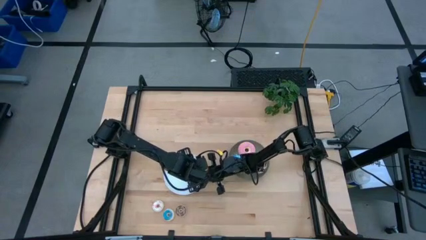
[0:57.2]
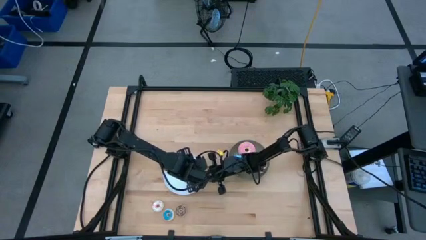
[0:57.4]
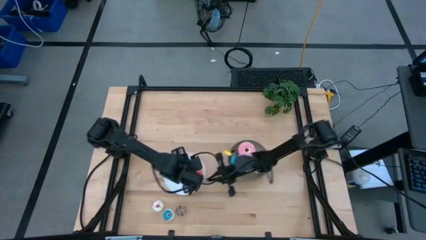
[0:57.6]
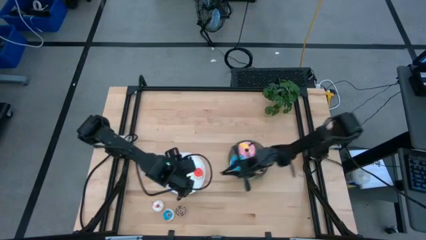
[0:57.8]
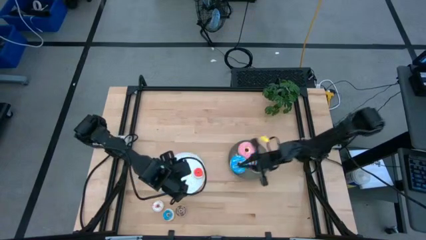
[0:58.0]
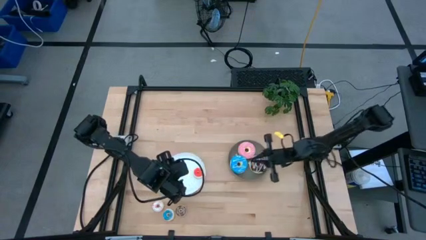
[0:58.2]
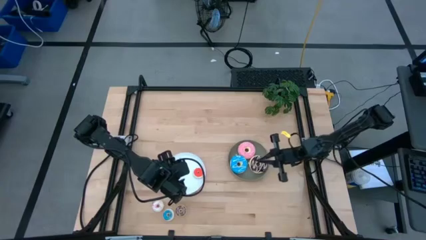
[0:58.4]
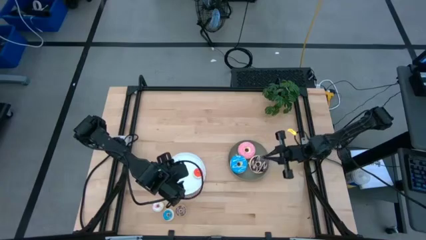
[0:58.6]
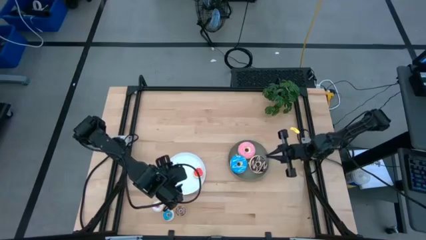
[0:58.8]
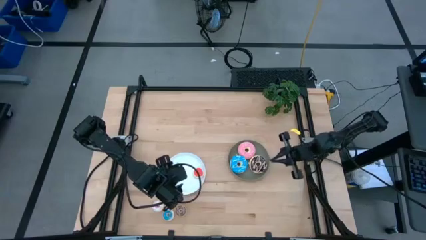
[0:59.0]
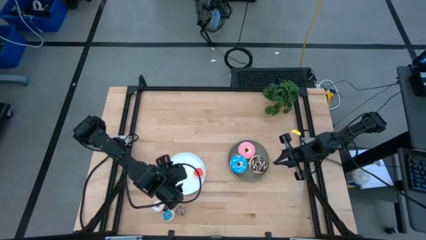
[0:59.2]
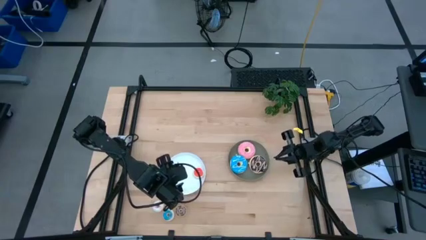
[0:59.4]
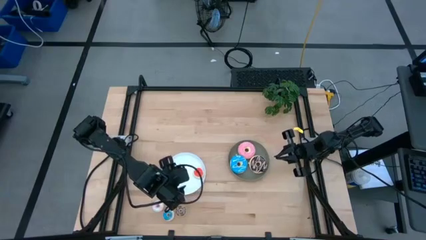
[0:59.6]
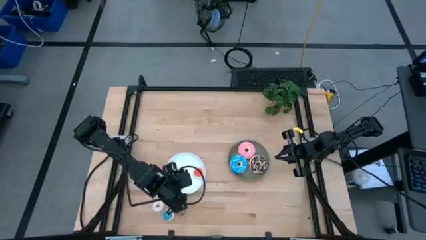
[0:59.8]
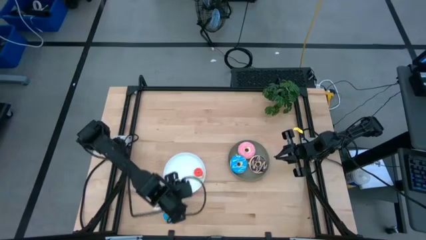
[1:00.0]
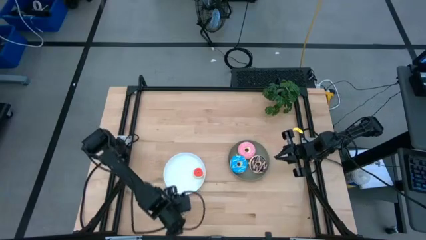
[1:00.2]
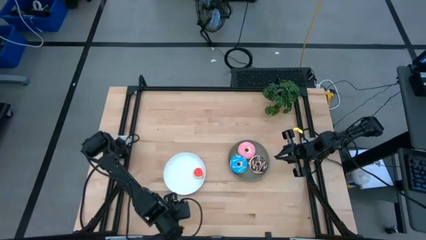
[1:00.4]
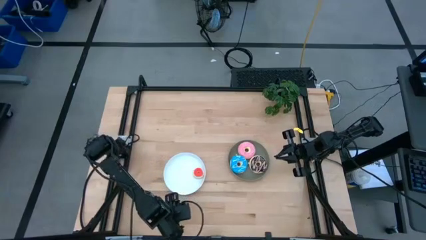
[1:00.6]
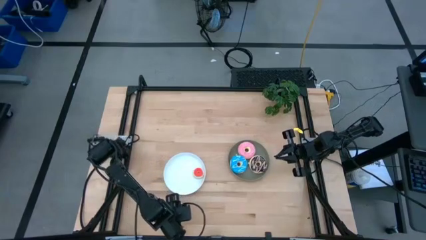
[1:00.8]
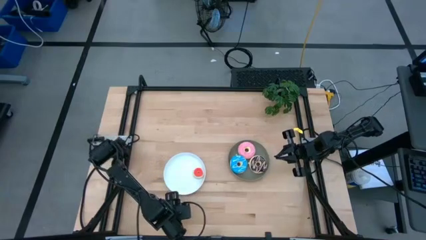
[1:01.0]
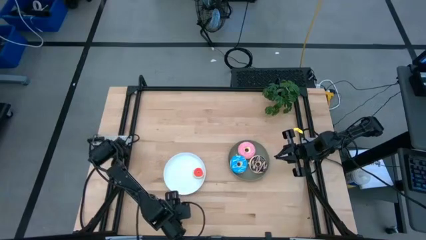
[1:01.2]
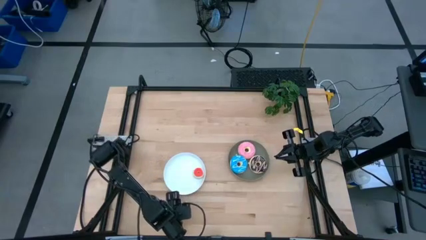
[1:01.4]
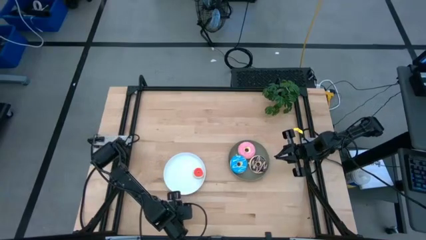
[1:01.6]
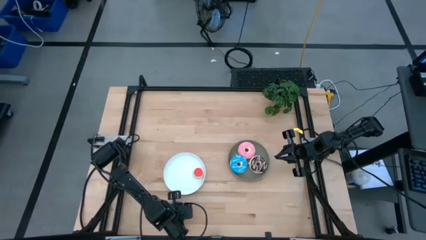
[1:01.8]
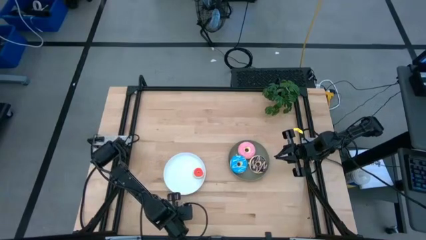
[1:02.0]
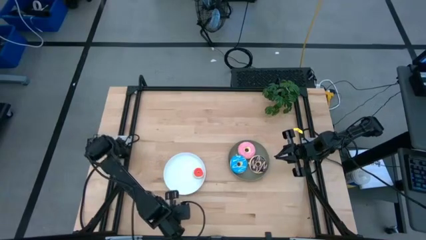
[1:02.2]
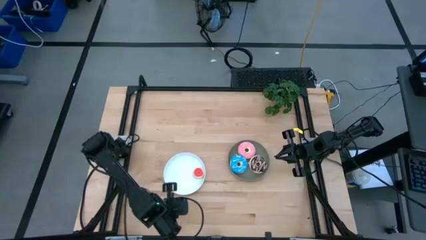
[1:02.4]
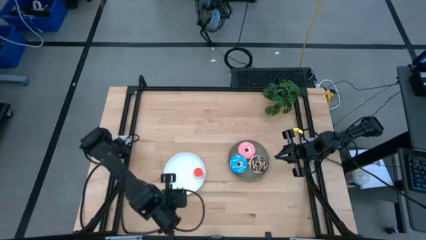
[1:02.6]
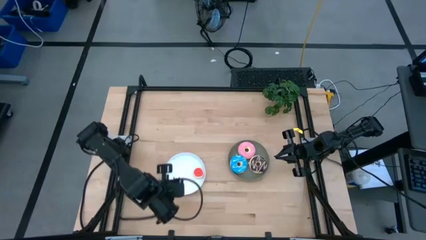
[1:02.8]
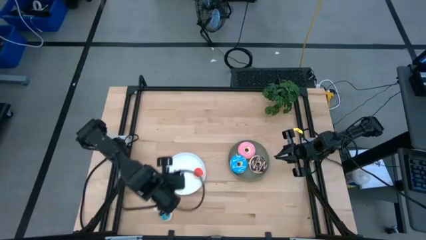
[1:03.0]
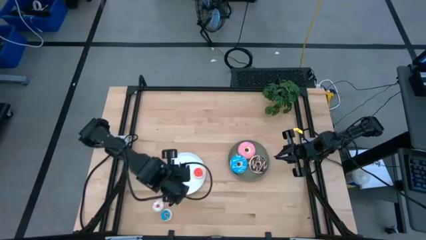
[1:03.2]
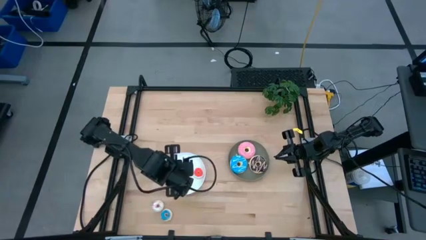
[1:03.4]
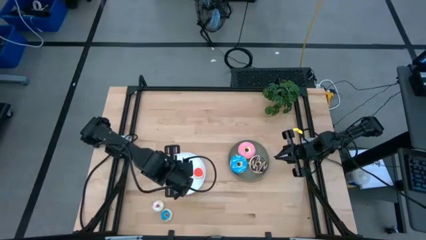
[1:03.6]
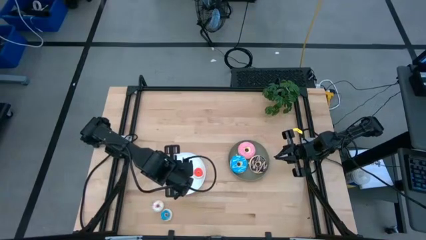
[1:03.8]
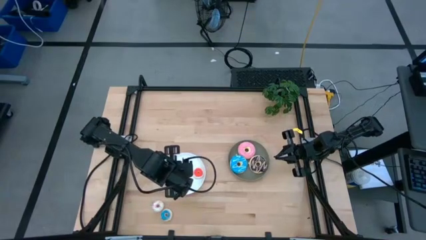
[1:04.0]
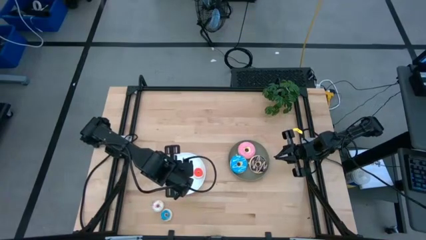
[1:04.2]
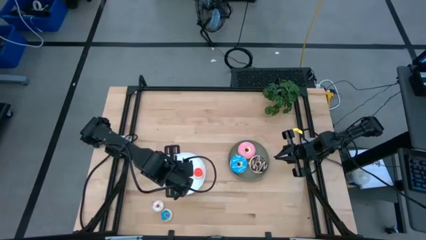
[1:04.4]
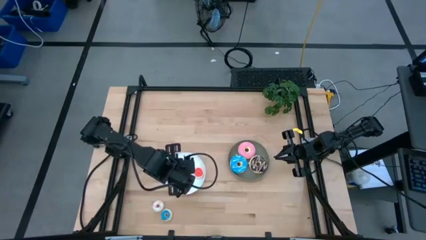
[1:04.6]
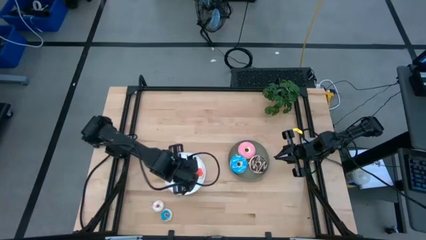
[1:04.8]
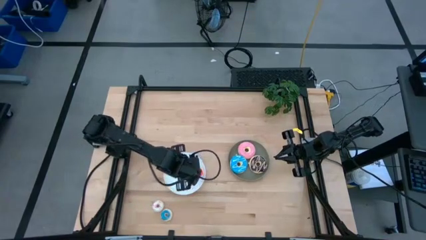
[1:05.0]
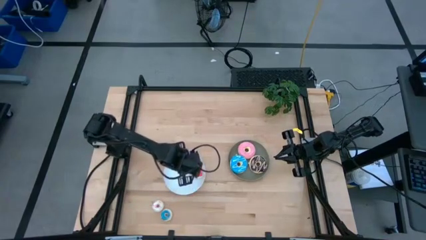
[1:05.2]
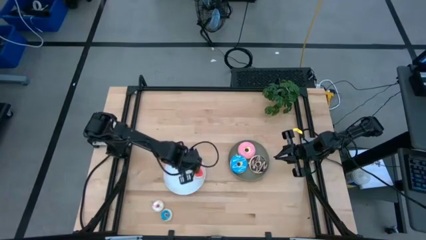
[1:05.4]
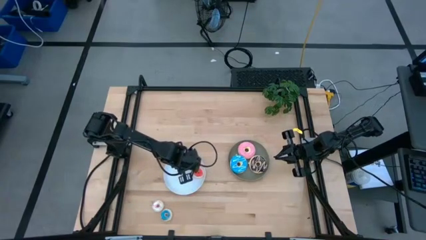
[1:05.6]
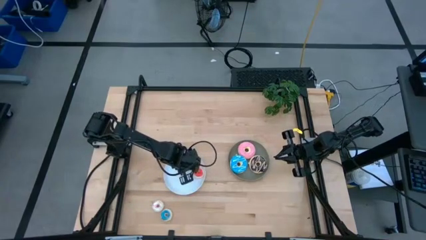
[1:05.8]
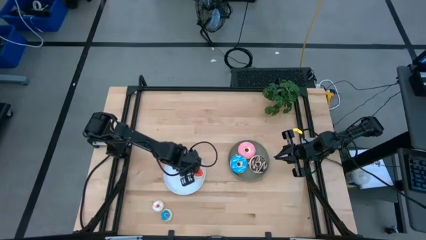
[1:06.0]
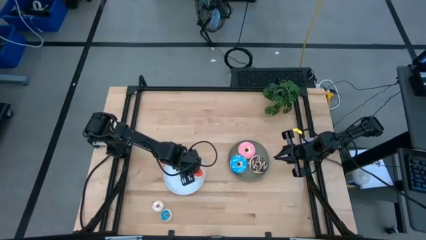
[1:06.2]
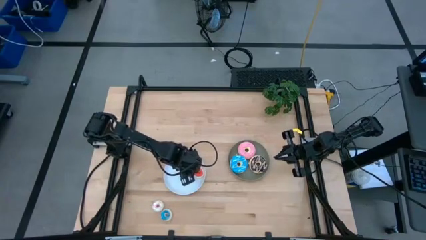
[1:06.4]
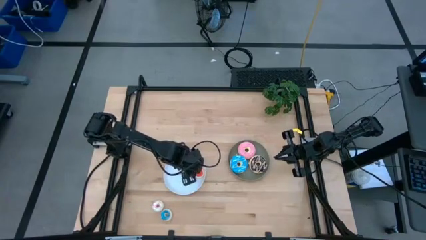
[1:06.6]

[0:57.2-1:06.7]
Task: Pick & Place donuts
Put the small brown donut on the white plate
